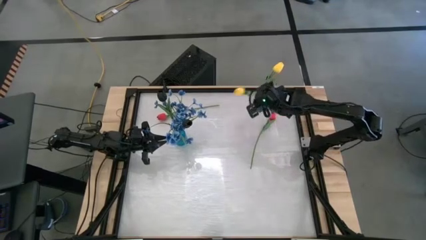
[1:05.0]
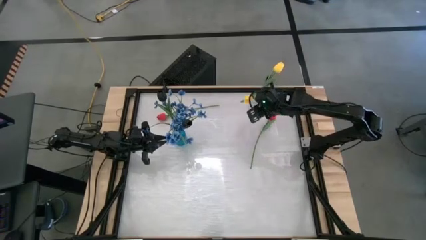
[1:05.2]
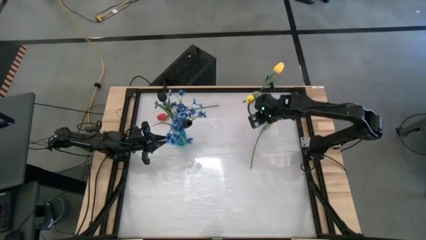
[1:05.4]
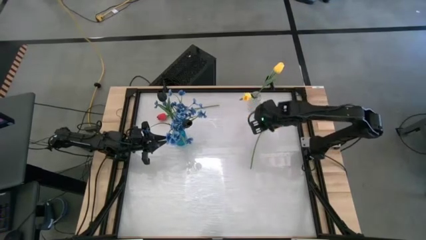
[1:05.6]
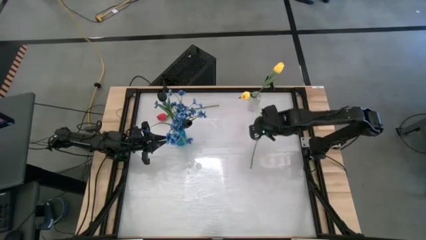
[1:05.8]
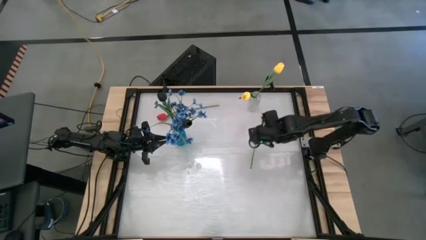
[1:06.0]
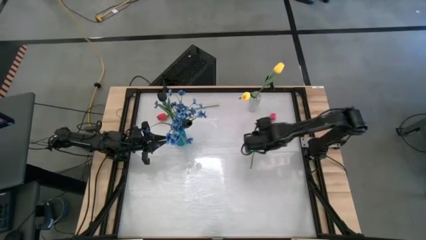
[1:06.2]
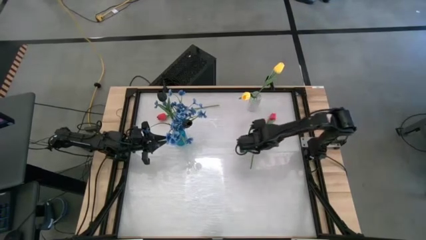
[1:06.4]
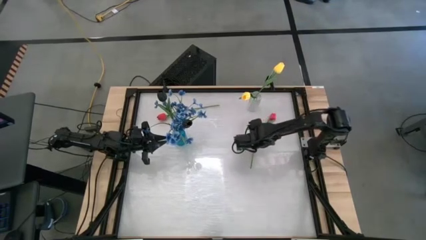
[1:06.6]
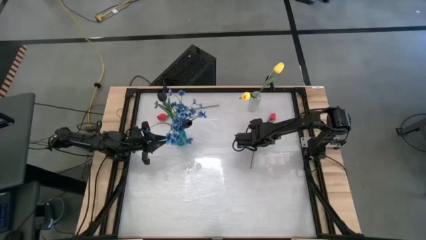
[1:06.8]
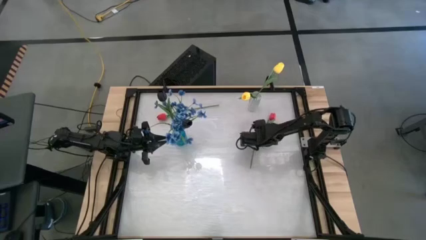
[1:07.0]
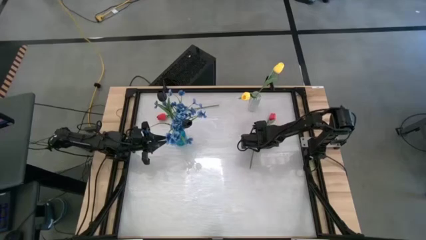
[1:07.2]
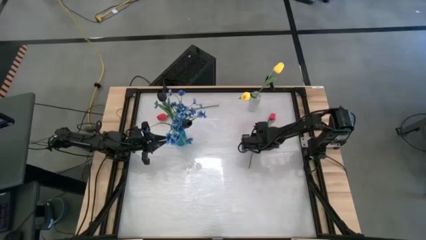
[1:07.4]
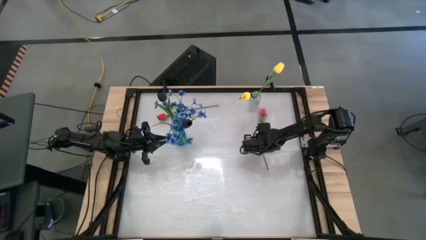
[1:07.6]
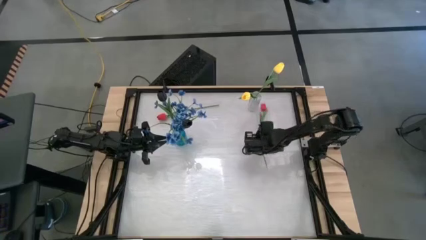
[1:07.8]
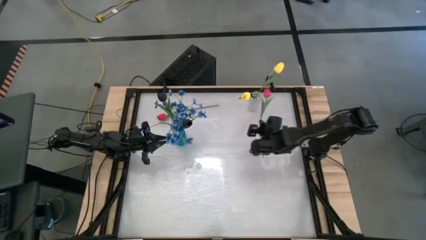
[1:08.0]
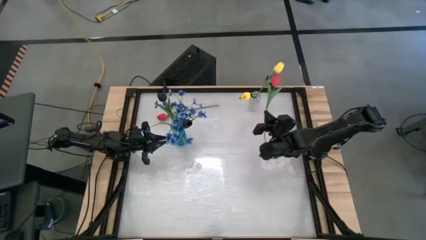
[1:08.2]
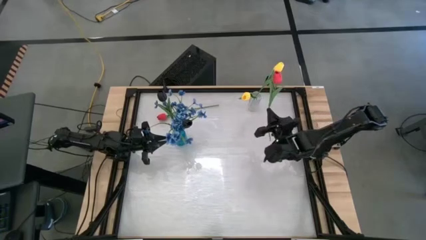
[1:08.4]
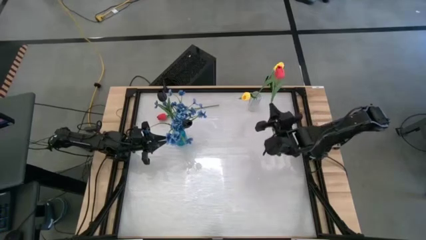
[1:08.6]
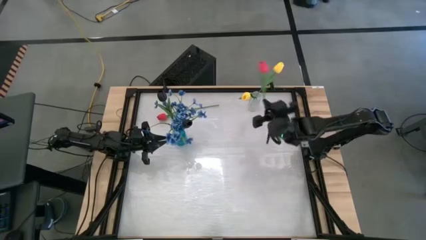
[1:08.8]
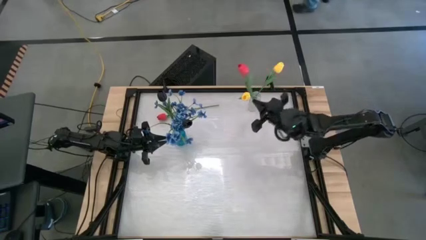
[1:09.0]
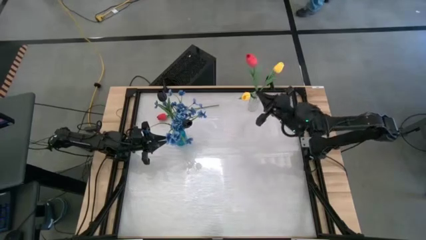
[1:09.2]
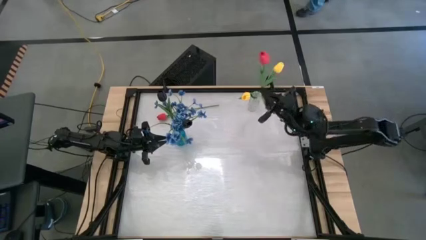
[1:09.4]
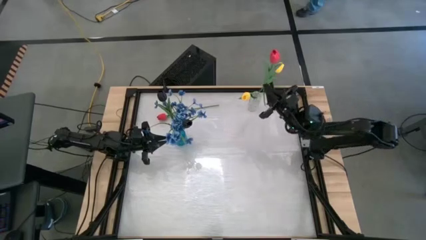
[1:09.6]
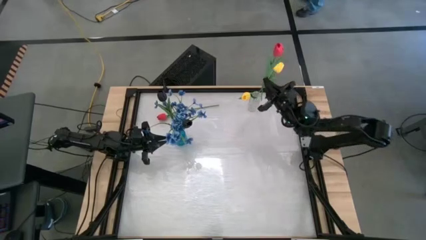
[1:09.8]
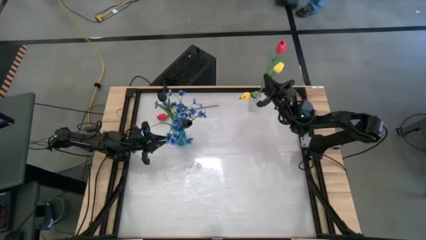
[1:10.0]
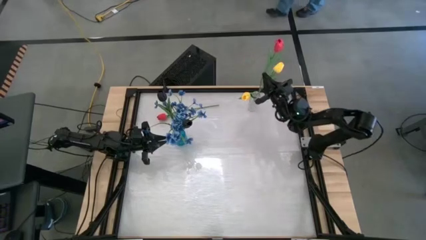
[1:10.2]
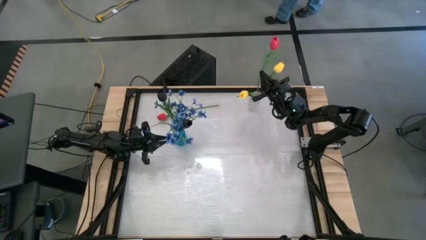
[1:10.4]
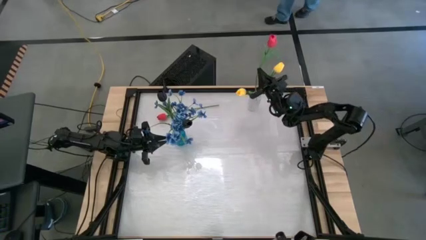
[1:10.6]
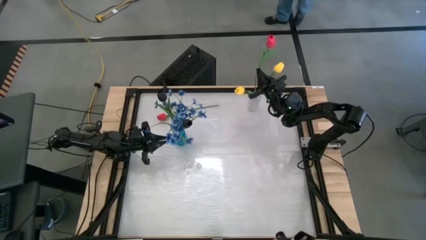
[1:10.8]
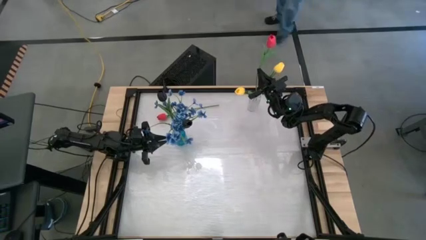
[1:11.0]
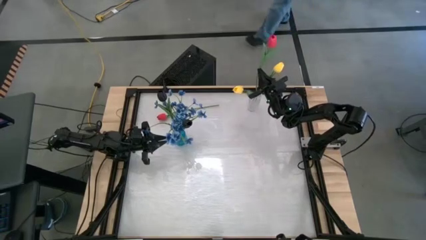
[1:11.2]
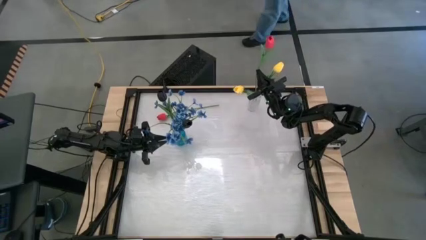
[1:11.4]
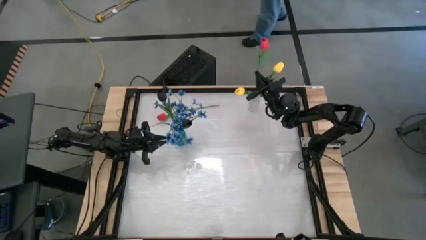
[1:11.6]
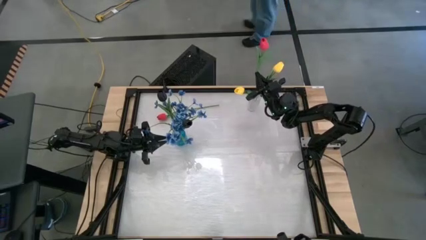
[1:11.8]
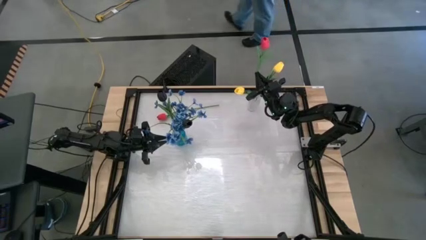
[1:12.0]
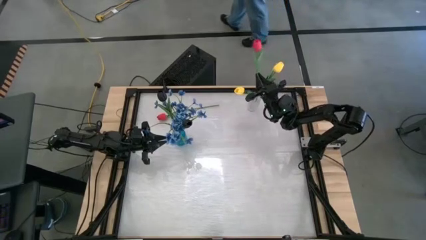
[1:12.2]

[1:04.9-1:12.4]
Task: Sort flowers into vase by color
Put the right red tulip flower into the transparent vase

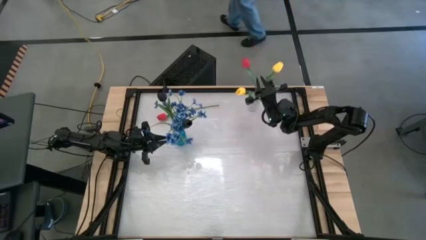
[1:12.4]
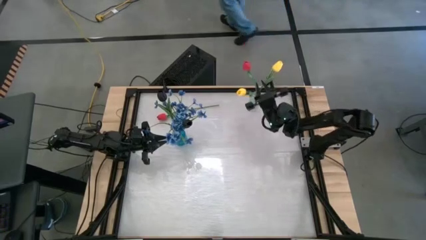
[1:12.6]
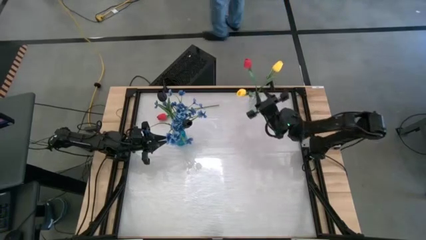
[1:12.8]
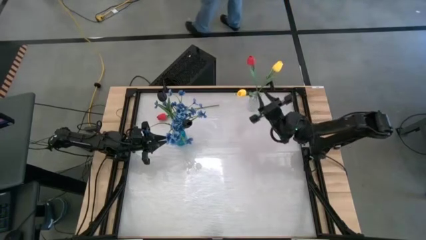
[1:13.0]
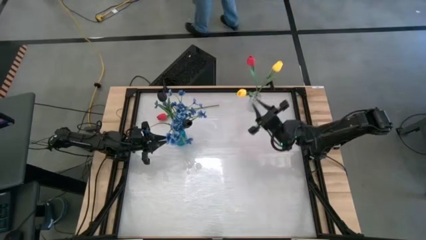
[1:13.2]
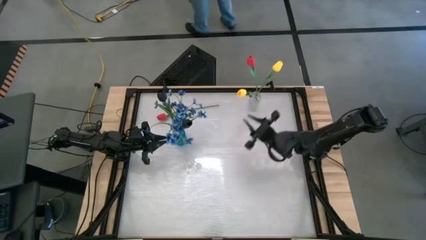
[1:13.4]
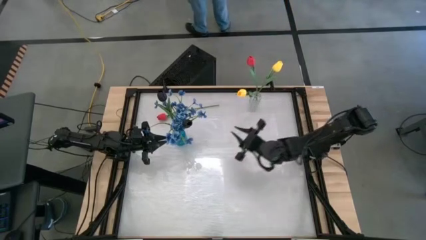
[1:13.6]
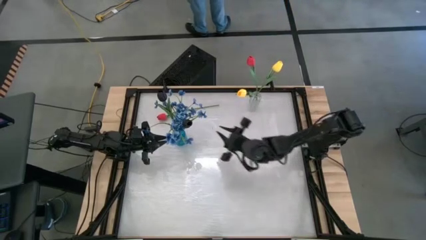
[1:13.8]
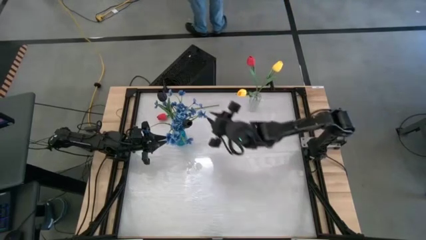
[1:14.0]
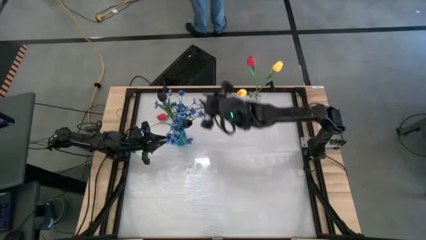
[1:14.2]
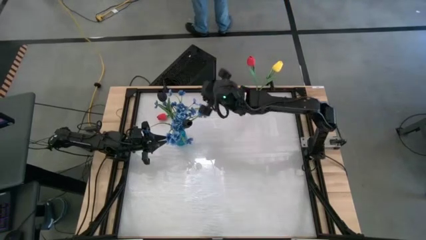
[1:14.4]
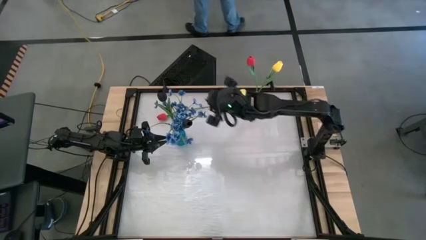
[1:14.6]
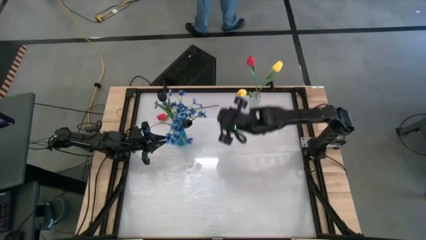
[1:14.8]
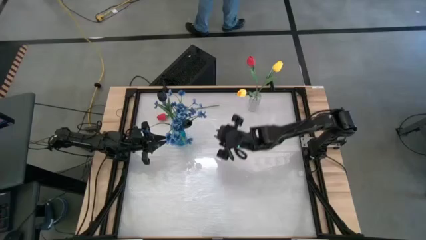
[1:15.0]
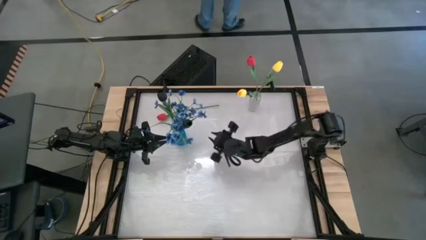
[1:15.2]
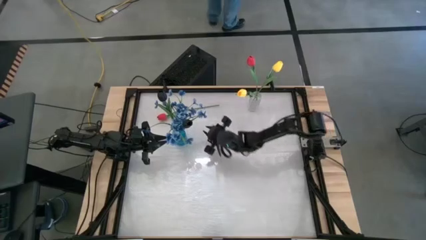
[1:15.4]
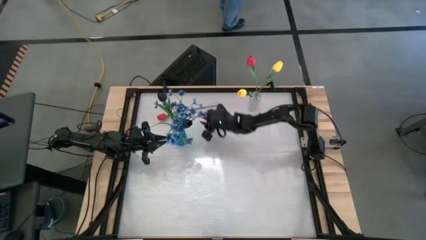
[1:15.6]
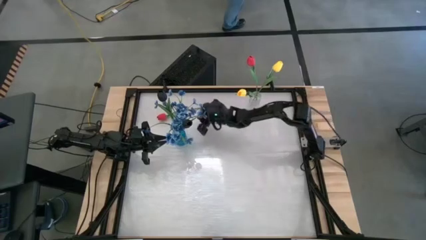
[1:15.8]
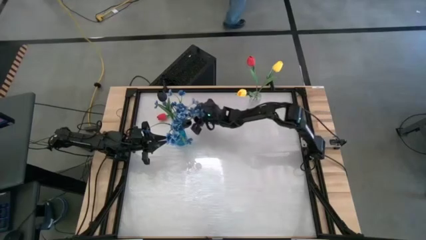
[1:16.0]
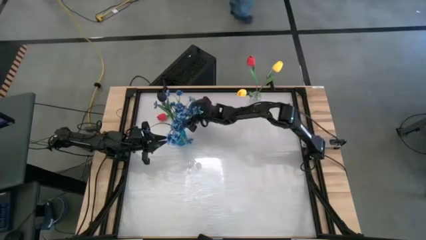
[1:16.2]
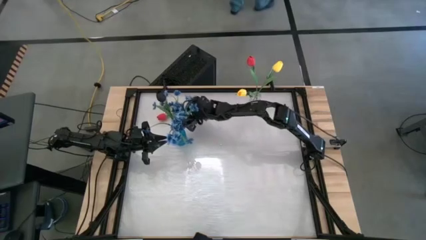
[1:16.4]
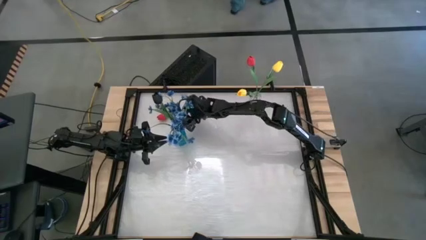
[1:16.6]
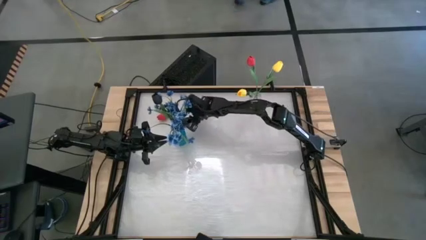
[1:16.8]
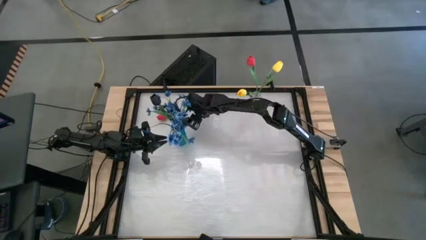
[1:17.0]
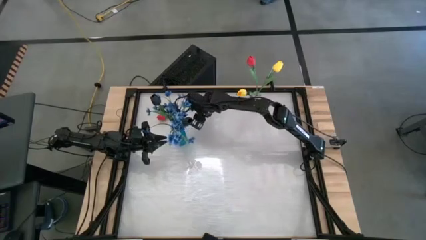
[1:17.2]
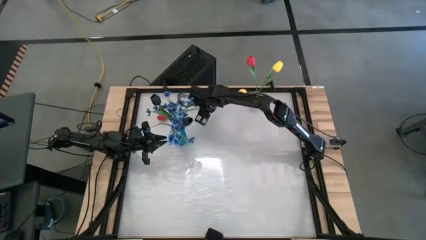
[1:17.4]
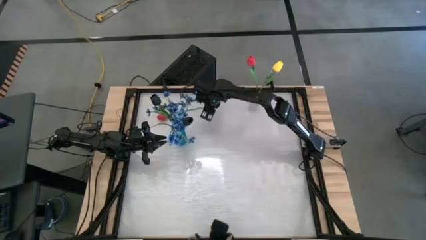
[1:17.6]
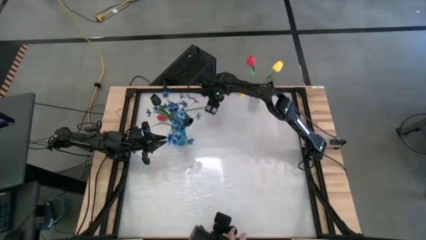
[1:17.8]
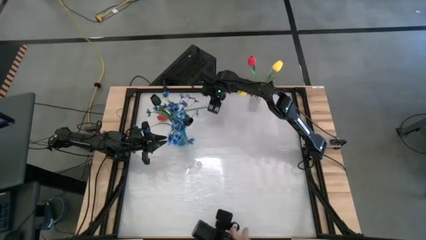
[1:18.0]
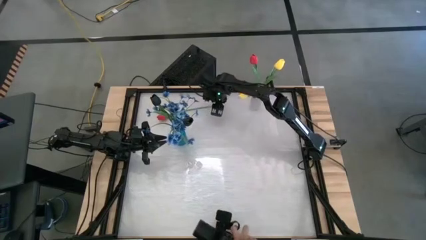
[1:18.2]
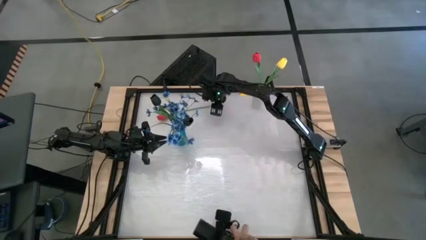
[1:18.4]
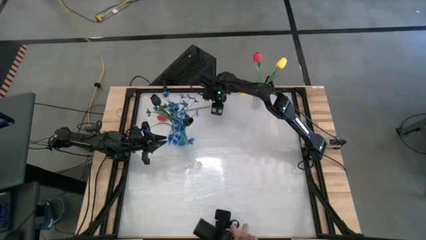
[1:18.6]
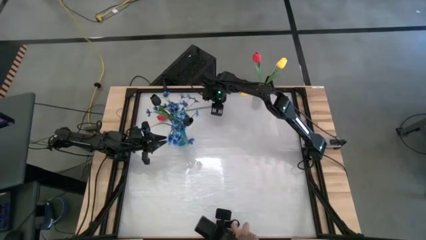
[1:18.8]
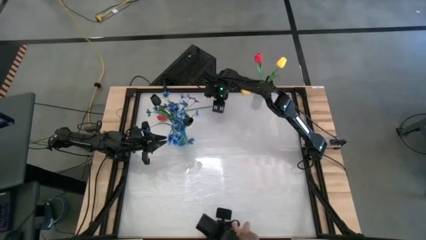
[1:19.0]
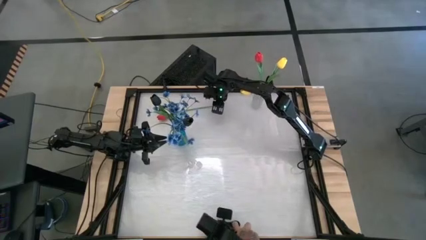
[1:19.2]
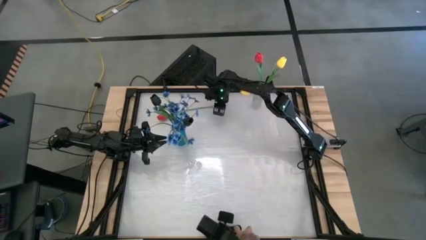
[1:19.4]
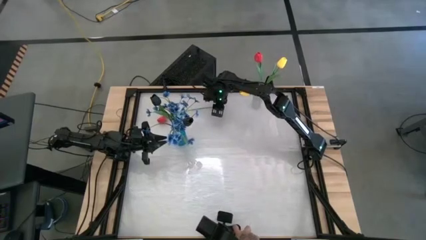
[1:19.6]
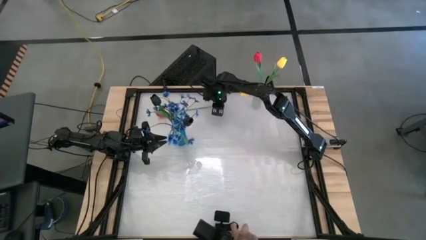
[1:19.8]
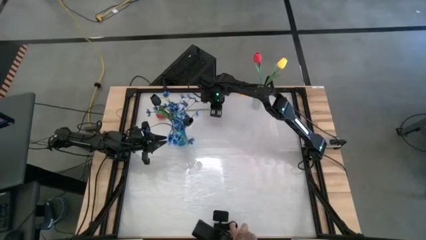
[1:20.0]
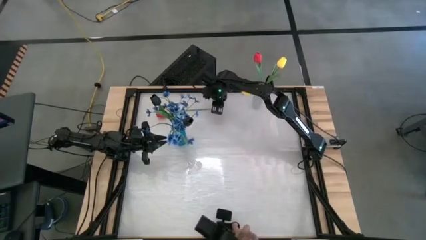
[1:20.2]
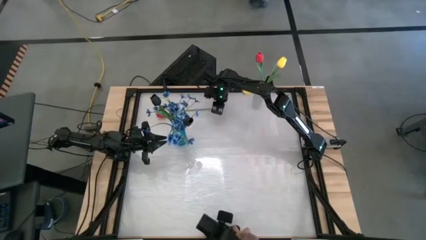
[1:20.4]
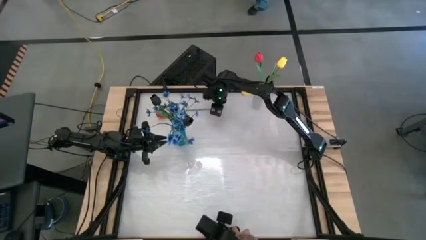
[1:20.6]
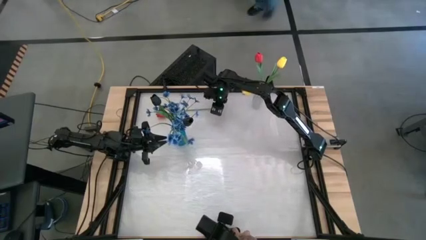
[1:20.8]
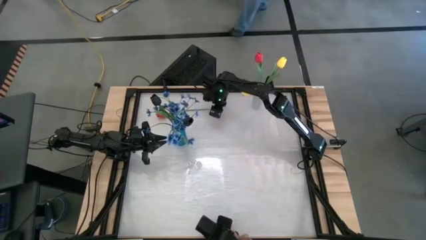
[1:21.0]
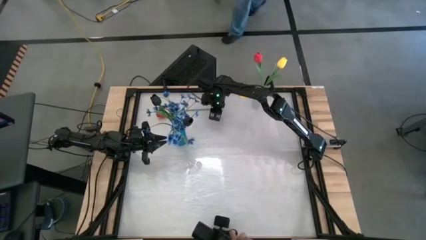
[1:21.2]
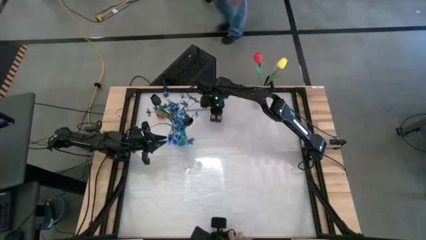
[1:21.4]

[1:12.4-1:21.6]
Put the red tulip flower into the transparent vase
